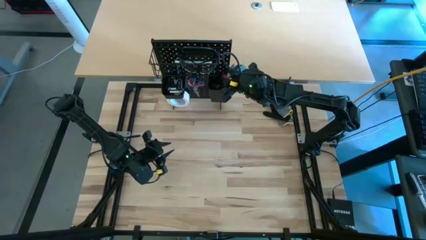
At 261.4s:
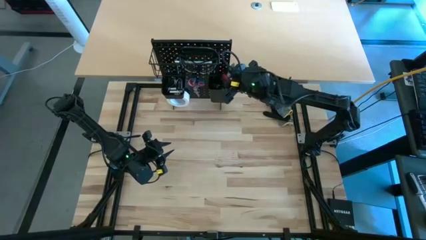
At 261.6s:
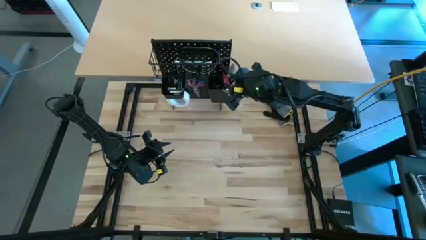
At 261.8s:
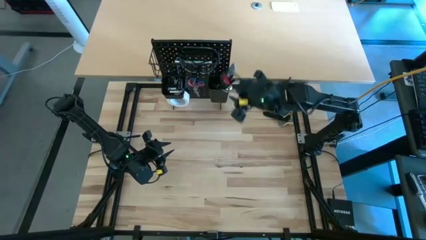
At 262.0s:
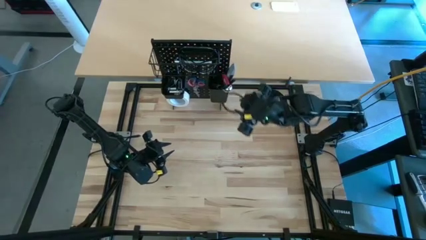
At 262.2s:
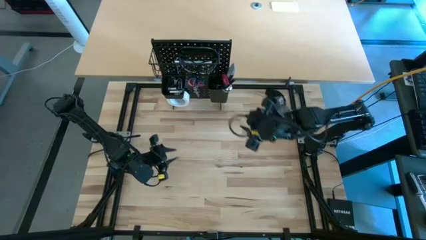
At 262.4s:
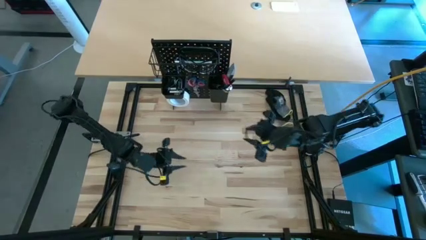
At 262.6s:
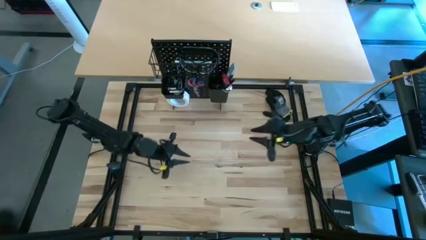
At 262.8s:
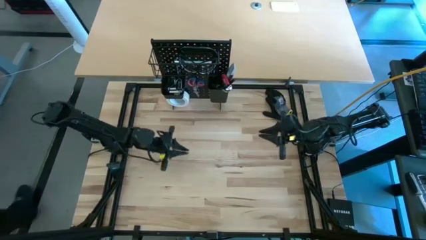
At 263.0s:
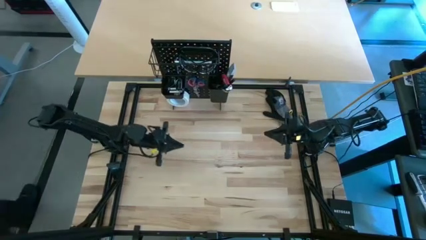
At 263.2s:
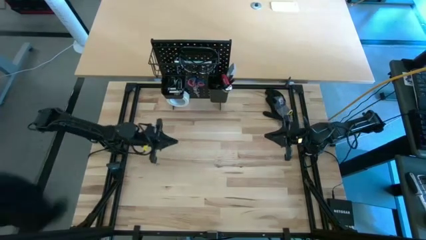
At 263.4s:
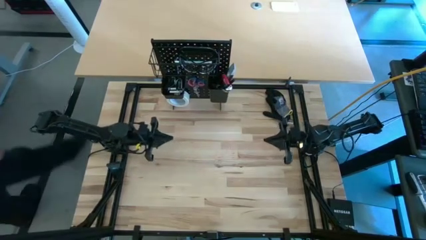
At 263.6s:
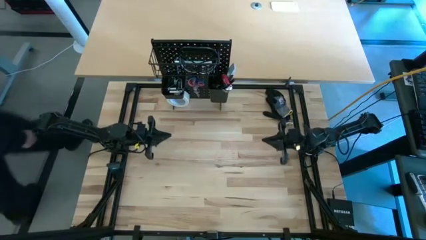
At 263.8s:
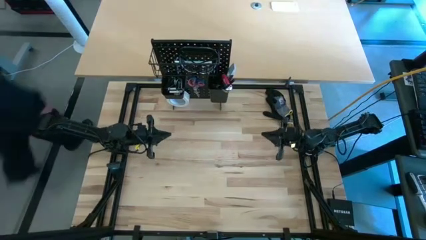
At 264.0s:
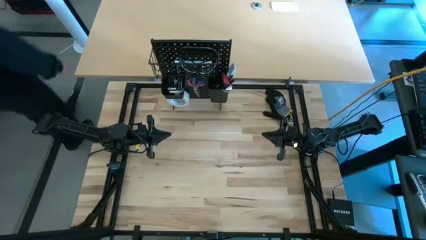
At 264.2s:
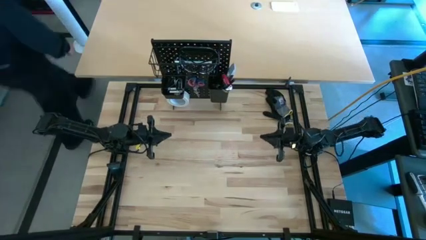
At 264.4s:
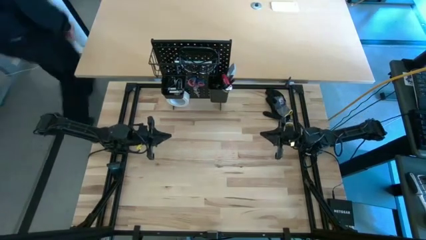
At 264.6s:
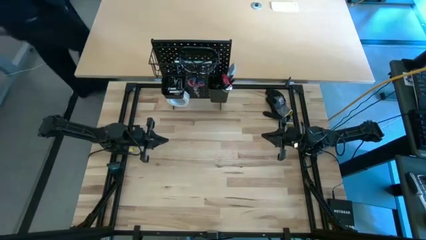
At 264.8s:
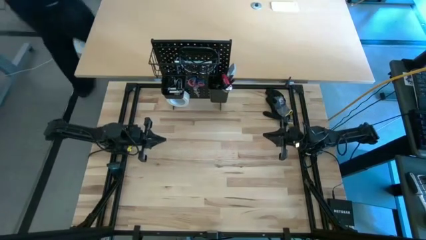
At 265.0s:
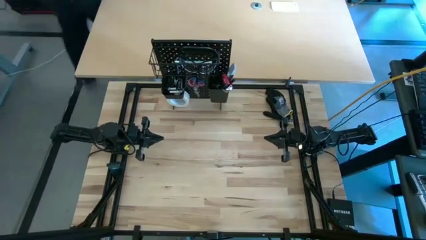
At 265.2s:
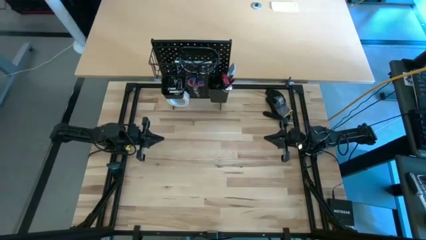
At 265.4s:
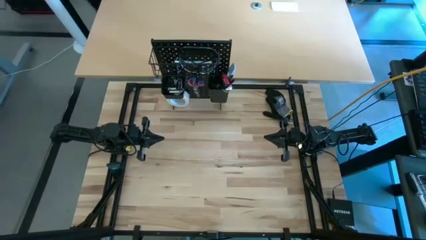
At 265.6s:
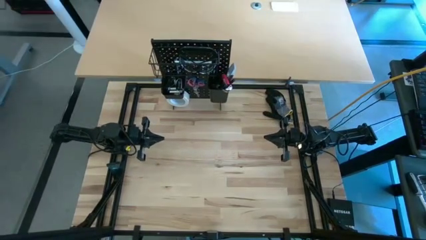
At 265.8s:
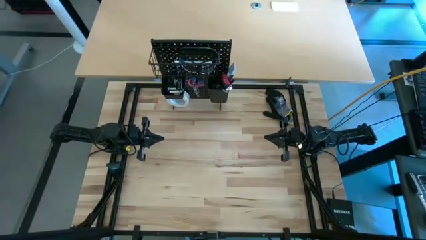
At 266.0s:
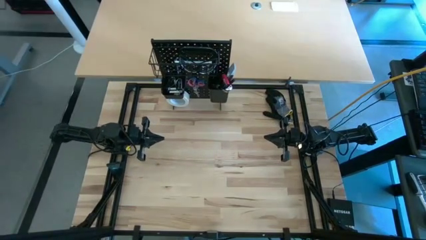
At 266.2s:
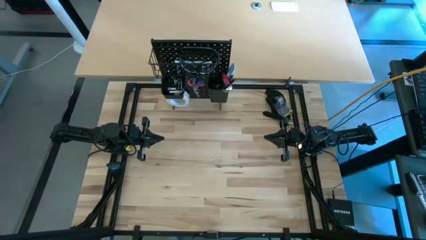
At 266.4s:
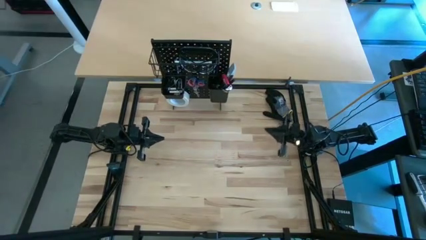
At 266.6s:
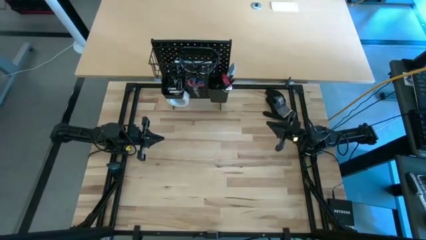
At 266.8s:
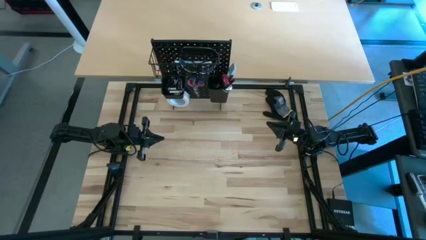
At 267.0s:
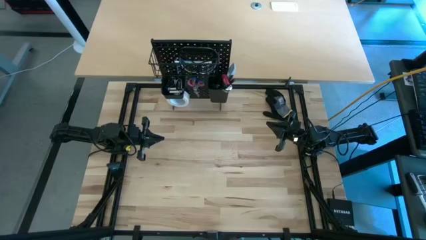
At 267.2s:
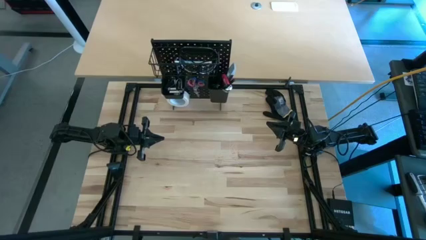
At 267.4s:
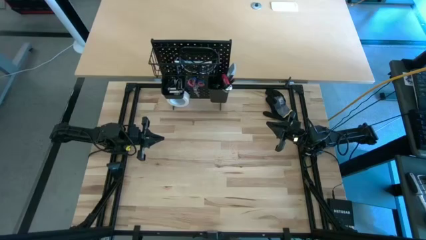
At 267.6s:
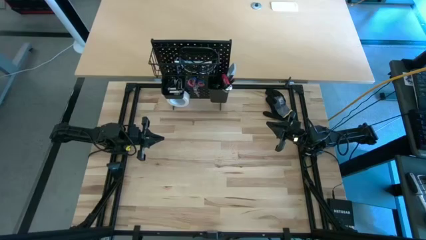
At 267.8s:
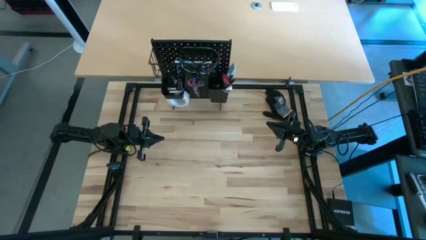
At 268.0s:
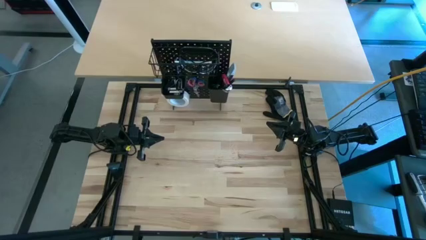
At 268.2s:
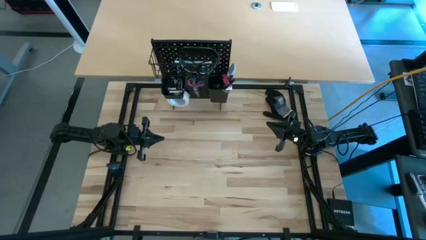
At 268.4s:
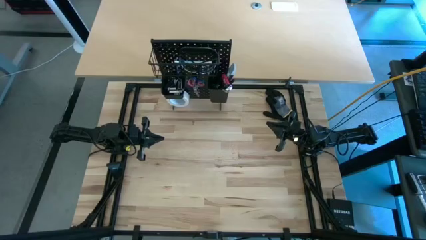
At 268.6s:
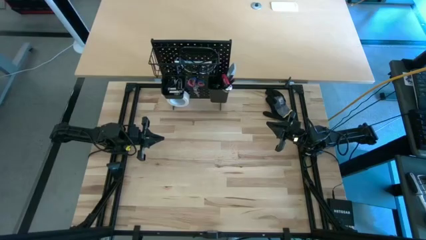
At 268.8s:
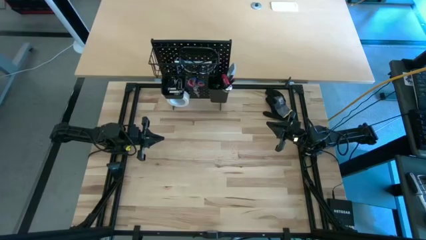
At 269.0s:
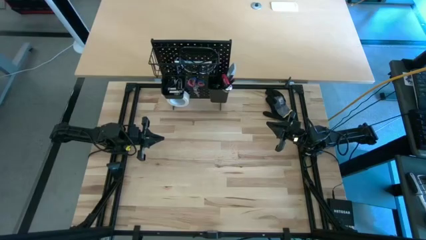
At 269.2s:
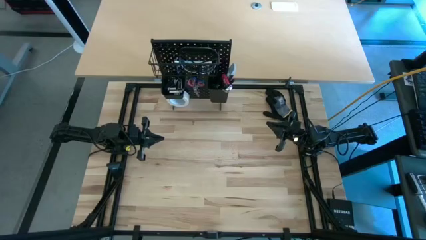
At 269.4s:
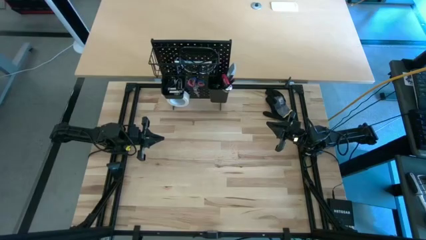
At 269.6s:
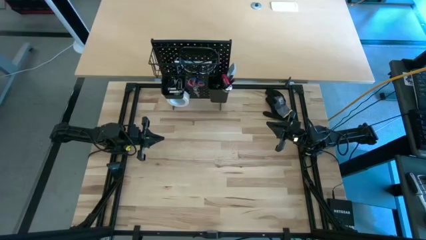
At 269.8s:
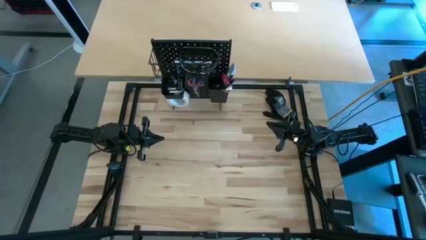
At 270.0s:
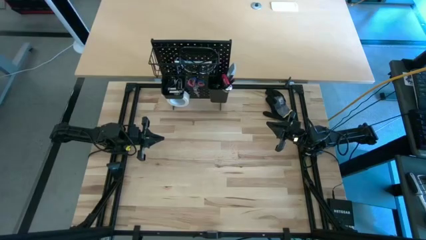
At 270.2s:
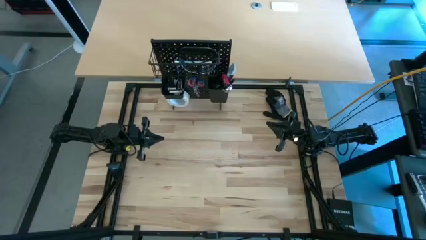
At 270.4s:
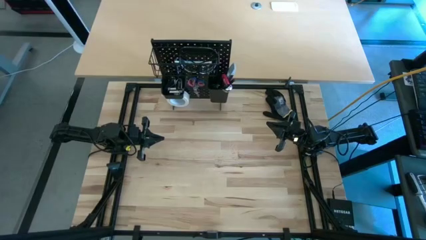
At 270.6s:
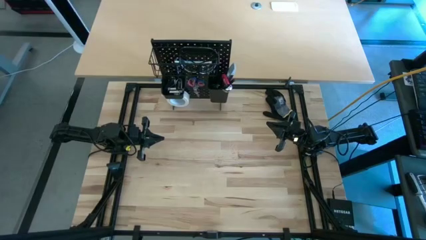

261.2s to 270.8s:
Task: Hang tools onto peg board
Return to Home Position

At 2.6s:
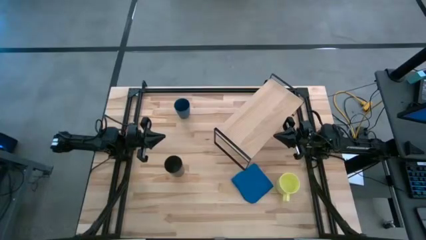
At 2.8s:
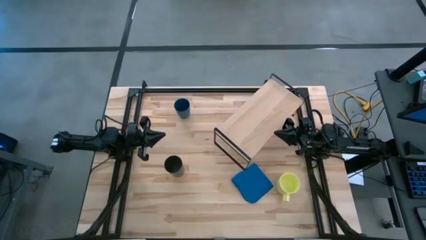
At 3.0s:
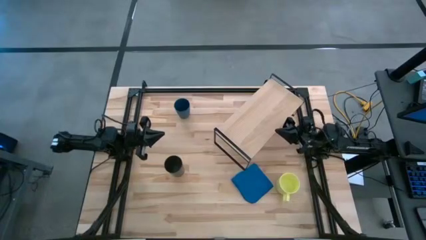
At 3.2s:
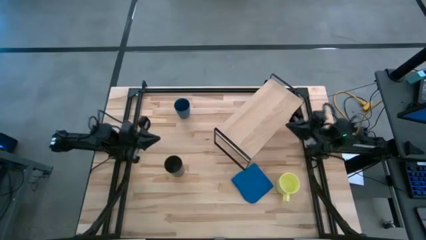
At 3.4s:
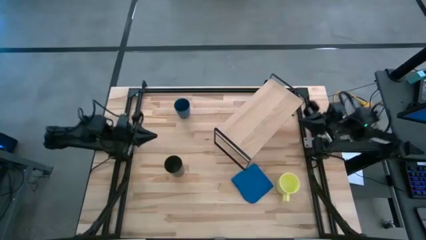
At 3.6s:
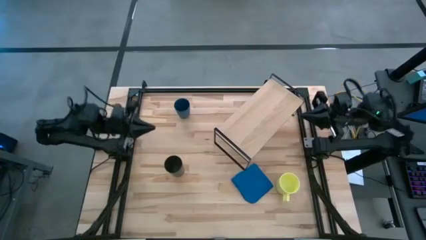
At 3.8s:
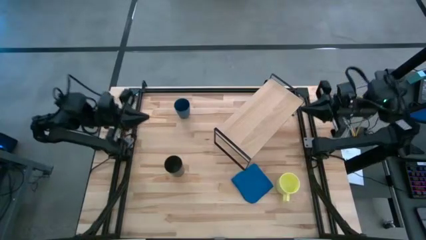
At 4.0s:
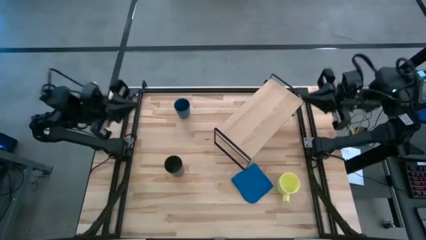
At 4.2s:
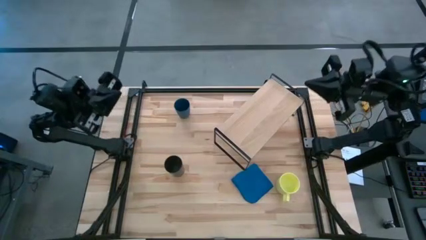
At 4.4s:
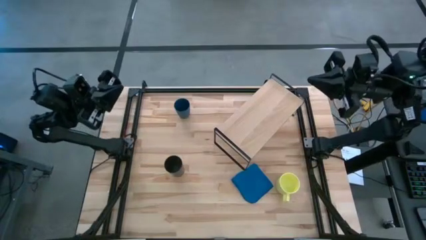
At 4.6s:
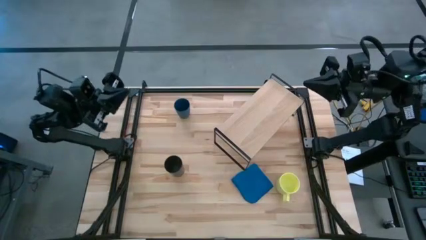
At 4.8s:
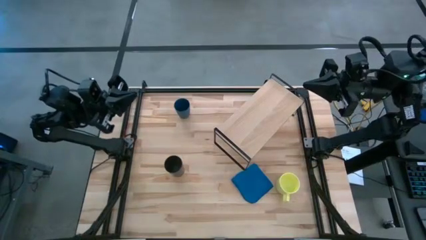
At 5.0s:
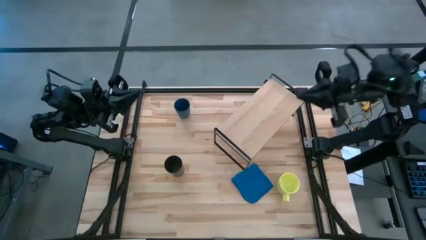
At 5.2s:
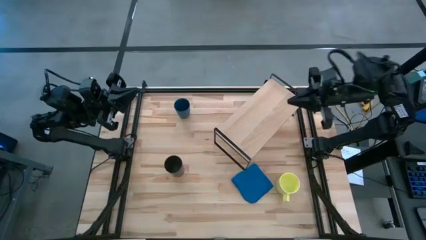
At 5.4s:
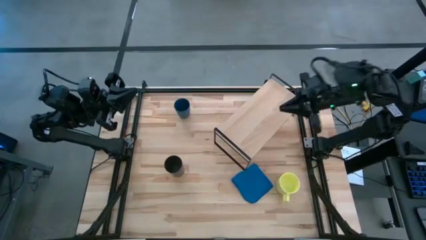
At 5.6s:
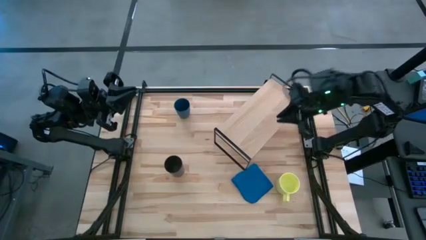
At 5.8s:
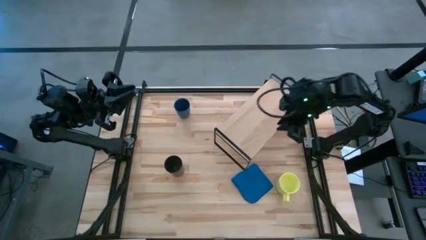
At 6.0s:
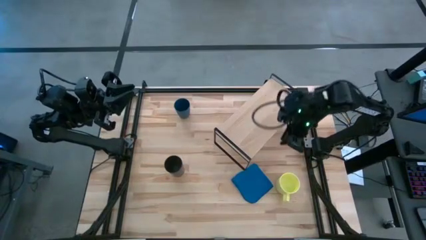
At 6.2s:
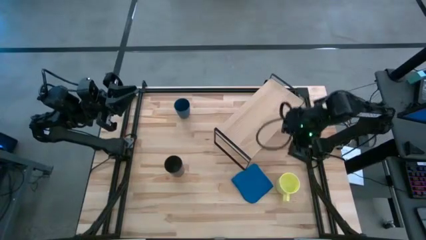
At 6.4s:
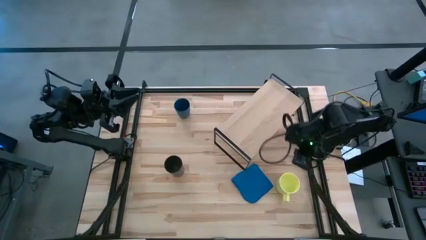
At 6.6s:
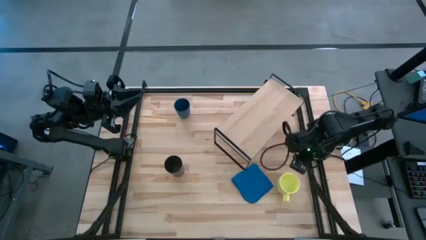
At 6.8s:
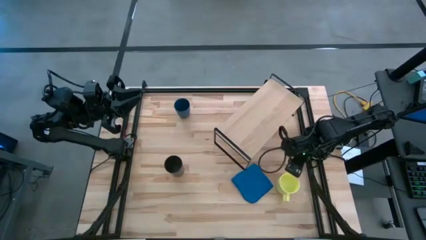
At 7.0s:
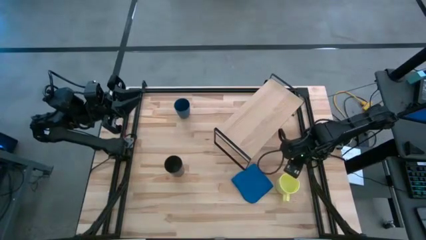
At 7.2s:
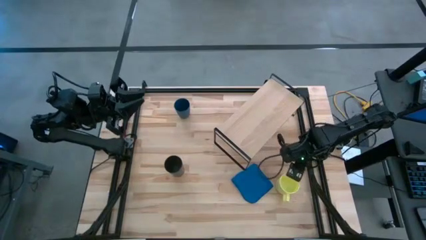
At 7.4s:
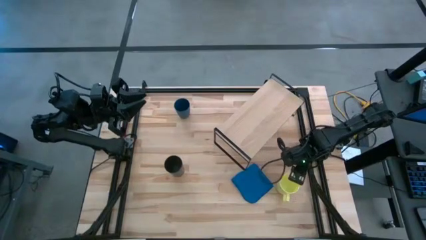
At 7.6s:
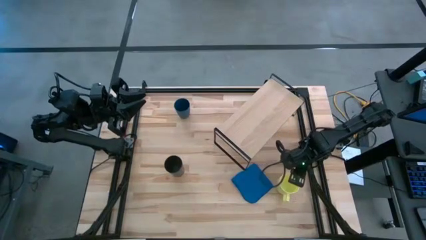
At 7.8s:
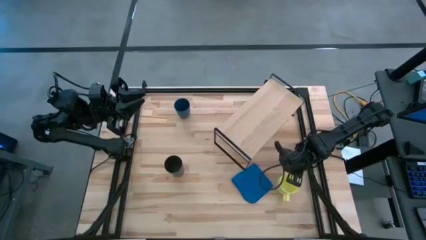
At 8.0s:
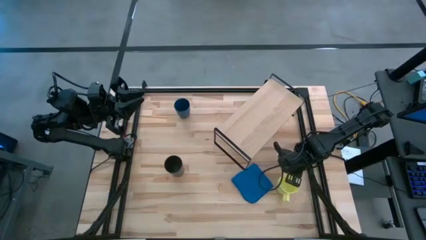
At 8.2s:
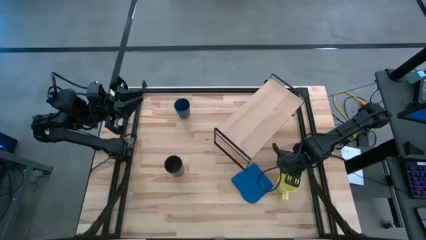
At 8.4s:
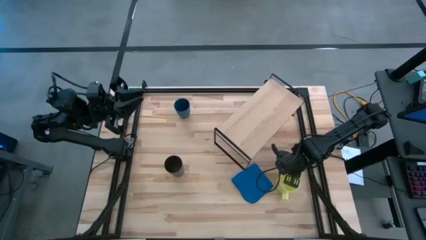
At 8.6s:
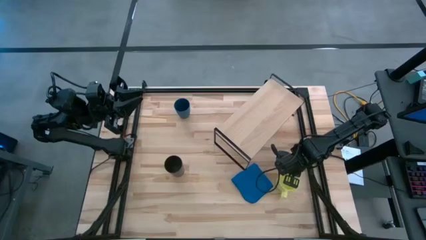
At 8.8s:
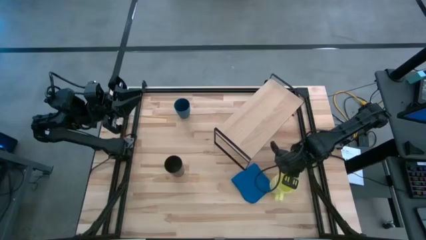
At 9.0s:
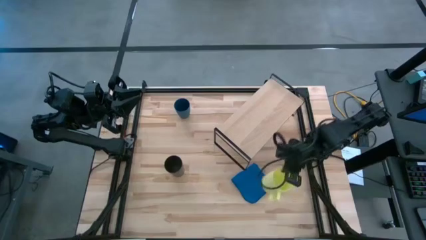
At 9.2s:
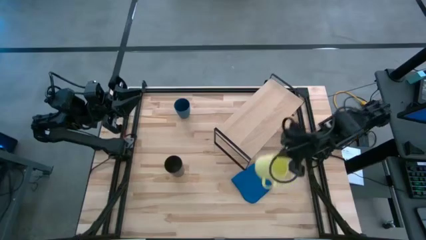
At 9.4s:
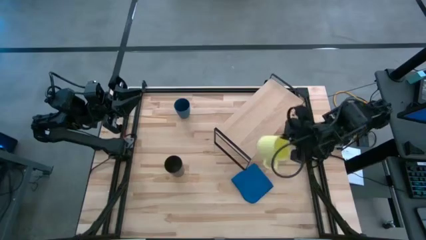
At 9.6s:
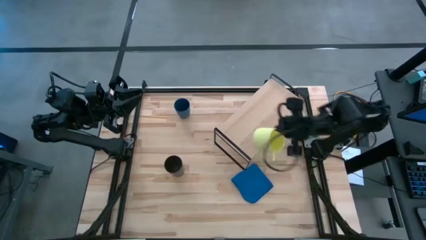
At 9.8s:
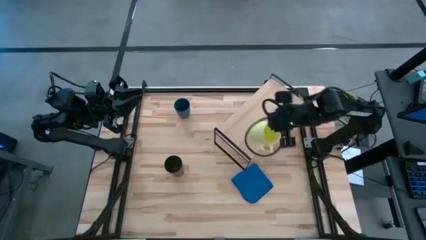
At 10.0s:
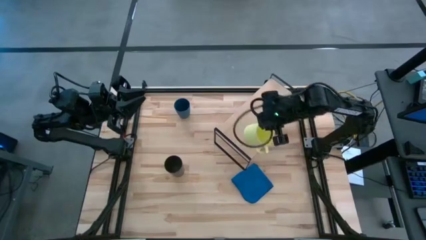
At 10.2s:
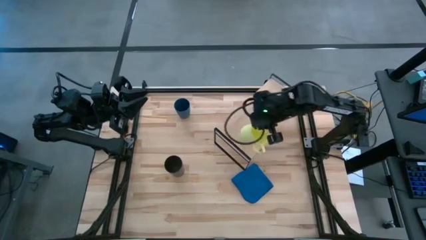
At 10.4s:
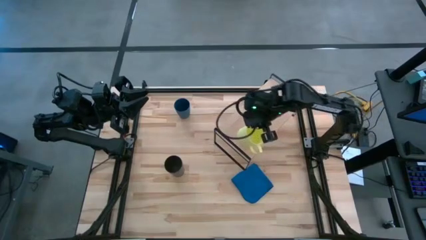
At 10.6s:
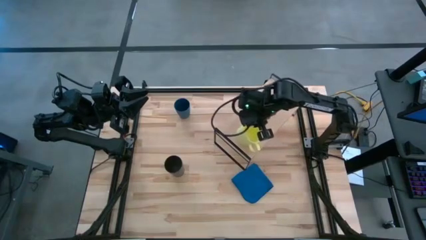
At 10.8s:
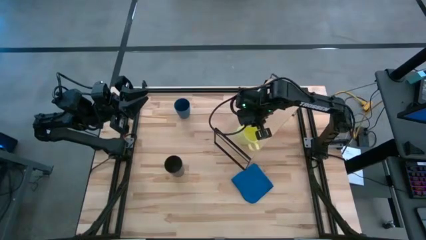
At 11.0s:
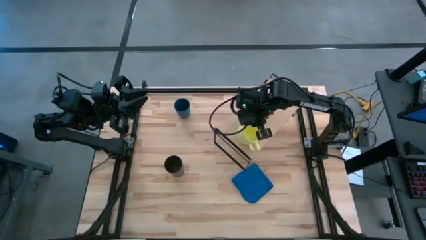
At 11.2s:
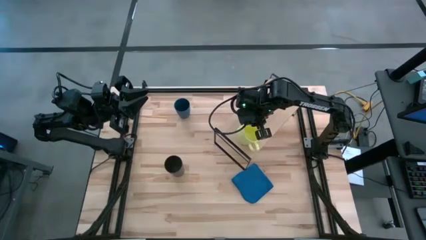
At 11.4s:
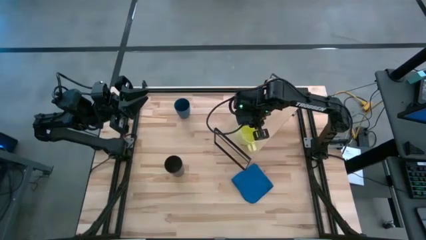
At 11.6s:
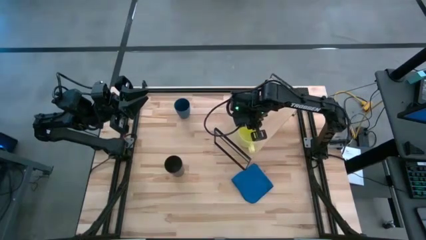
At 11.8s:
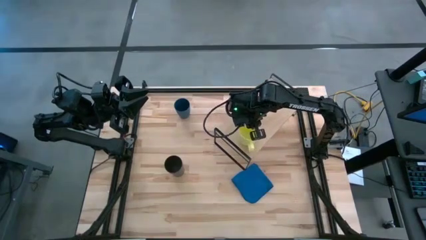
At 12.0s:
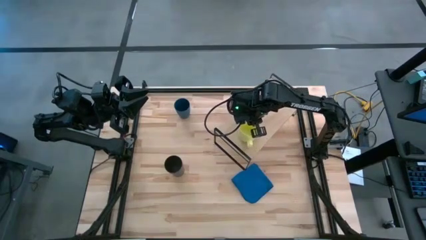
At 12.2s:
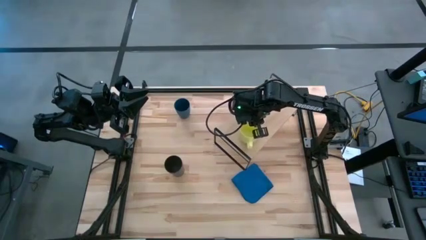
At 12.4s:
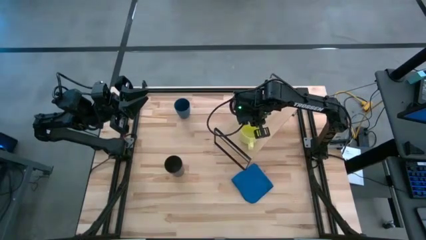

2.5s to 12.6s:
Task: Stack small to large cups/mugs on shelf
Put the yellow cup on the shelf
